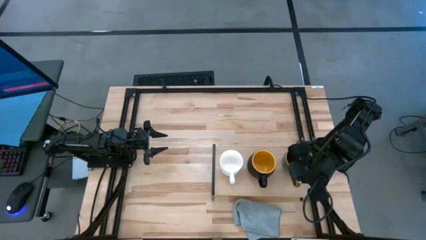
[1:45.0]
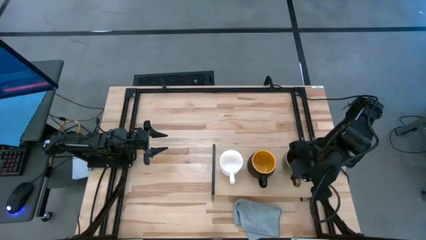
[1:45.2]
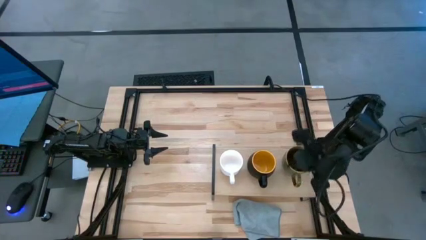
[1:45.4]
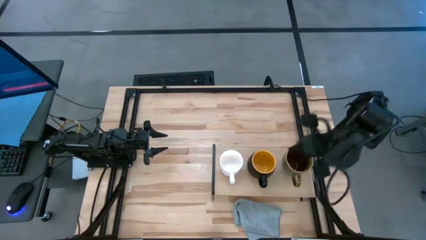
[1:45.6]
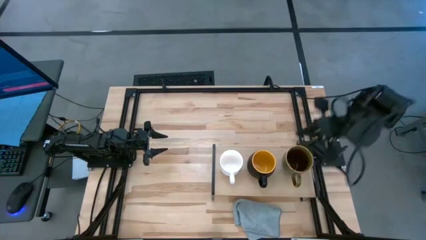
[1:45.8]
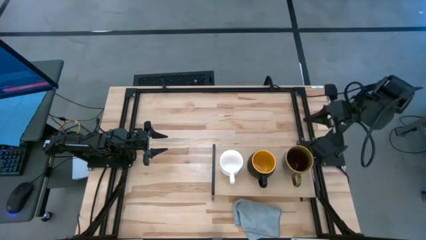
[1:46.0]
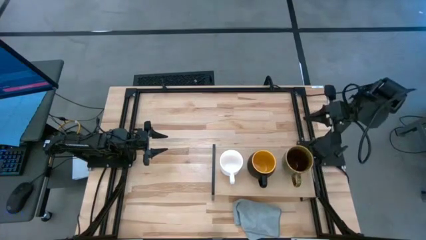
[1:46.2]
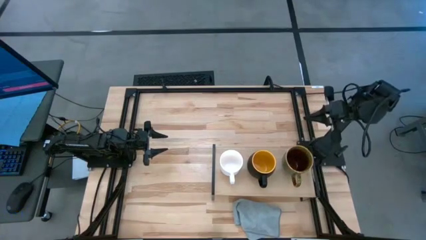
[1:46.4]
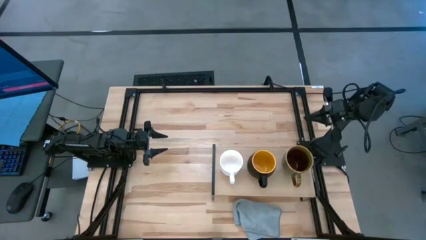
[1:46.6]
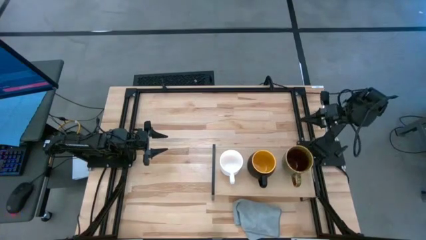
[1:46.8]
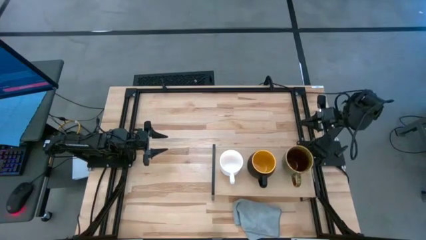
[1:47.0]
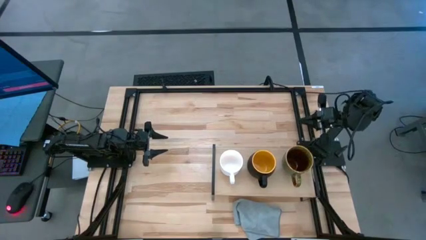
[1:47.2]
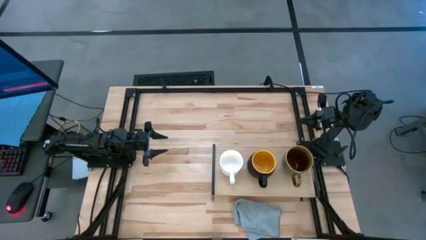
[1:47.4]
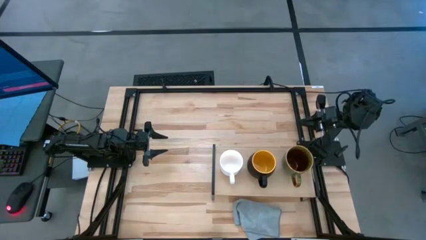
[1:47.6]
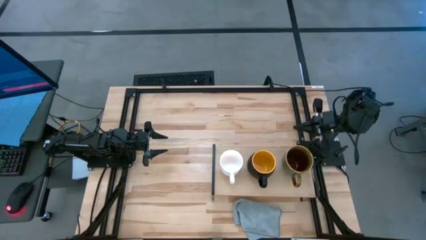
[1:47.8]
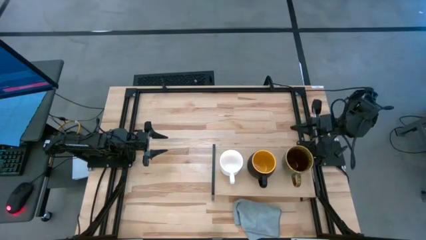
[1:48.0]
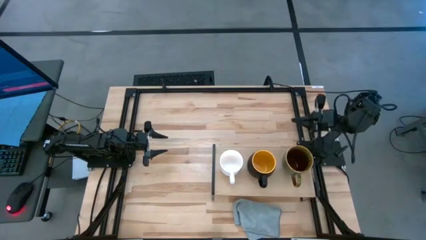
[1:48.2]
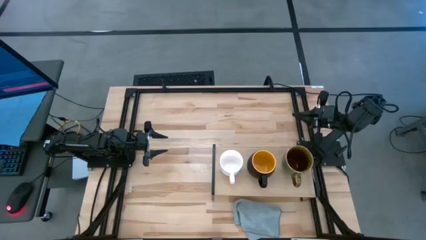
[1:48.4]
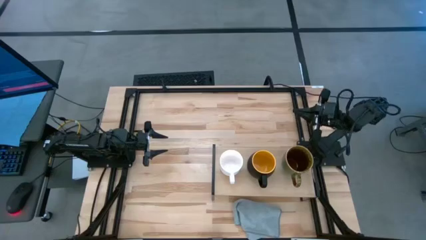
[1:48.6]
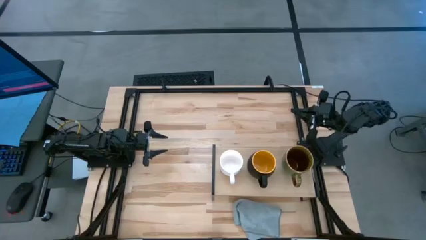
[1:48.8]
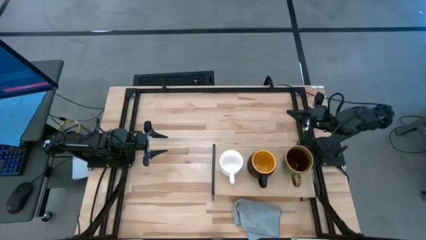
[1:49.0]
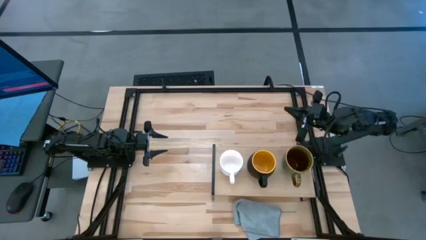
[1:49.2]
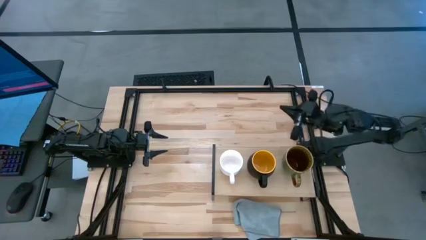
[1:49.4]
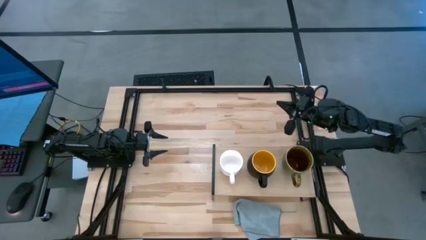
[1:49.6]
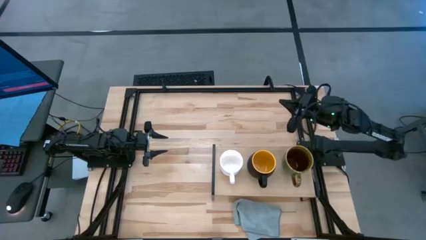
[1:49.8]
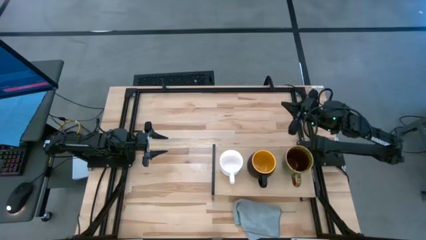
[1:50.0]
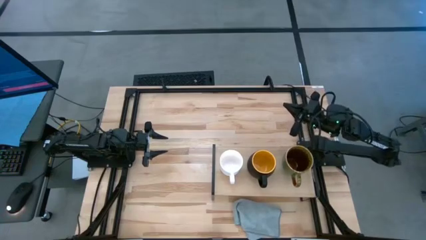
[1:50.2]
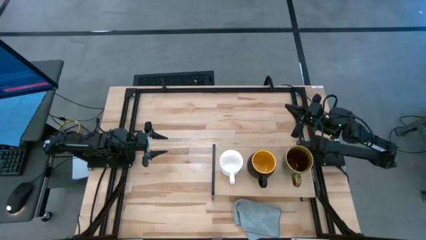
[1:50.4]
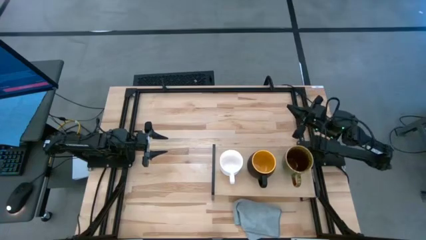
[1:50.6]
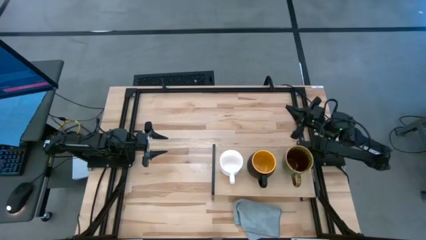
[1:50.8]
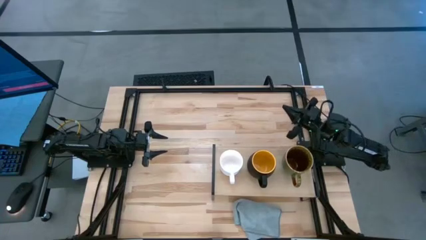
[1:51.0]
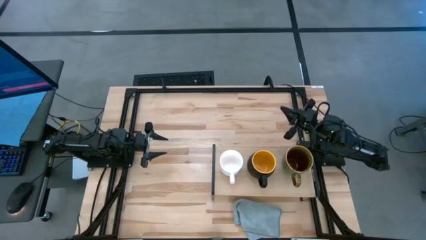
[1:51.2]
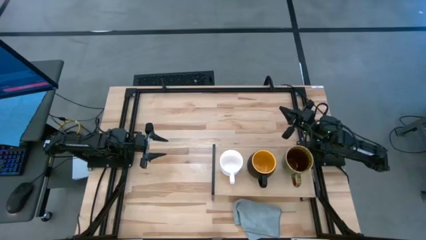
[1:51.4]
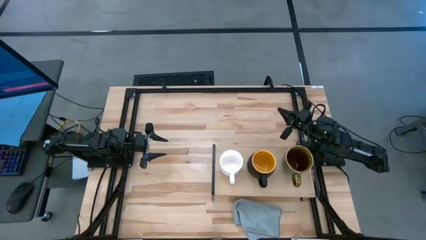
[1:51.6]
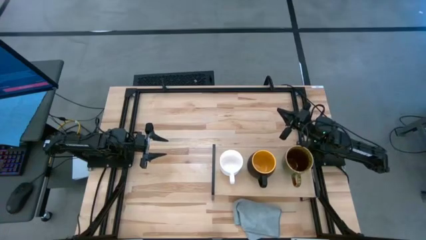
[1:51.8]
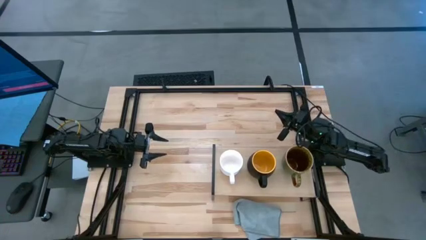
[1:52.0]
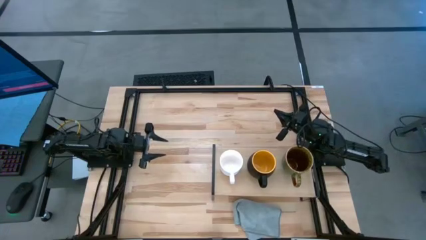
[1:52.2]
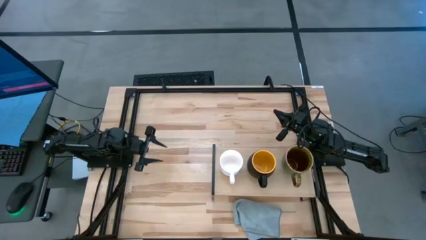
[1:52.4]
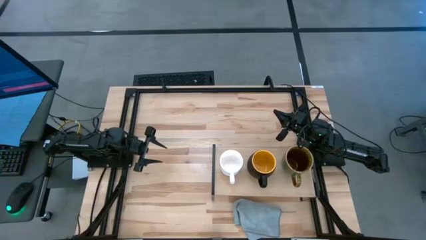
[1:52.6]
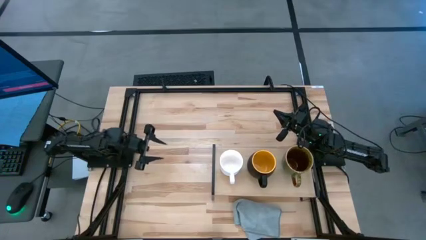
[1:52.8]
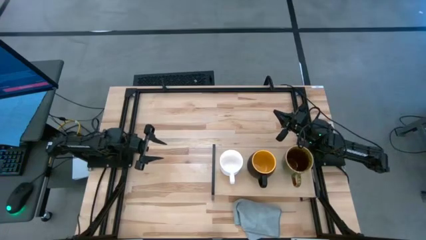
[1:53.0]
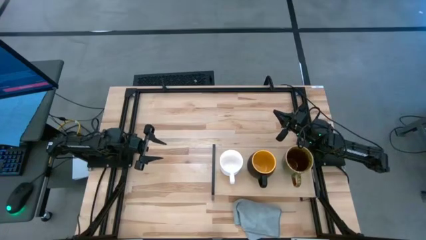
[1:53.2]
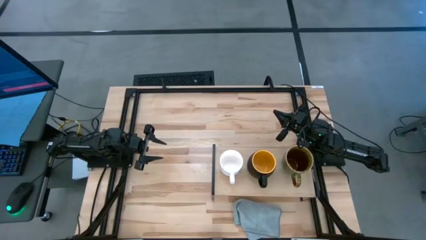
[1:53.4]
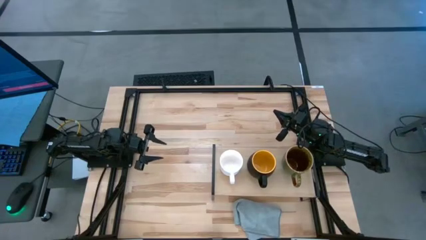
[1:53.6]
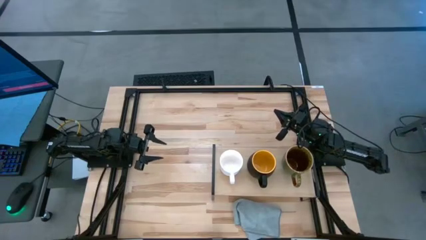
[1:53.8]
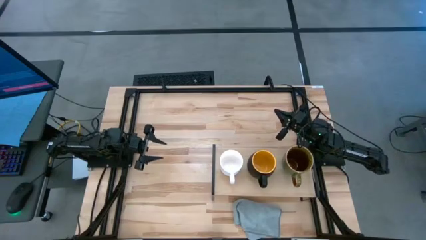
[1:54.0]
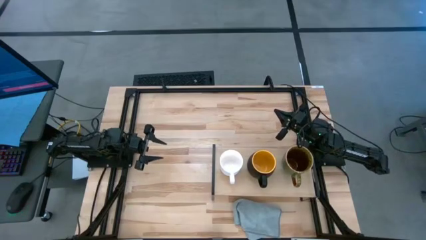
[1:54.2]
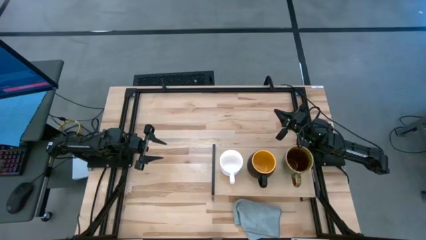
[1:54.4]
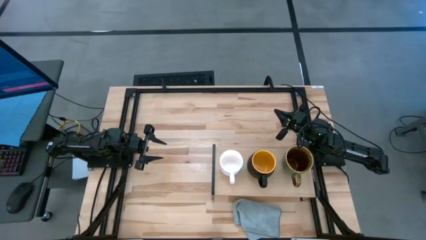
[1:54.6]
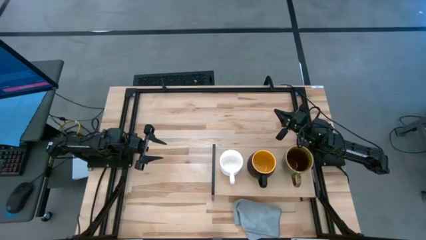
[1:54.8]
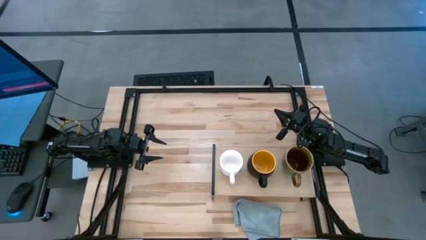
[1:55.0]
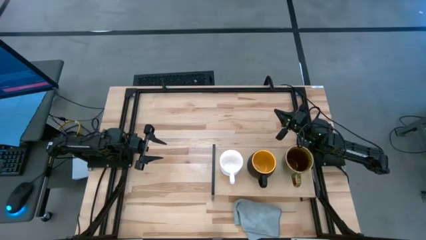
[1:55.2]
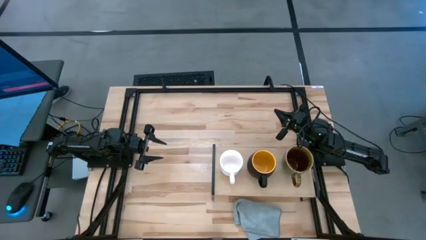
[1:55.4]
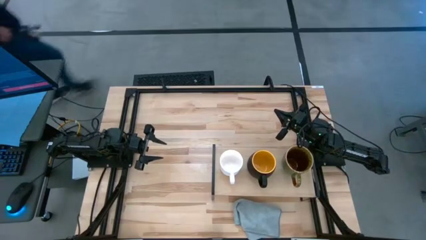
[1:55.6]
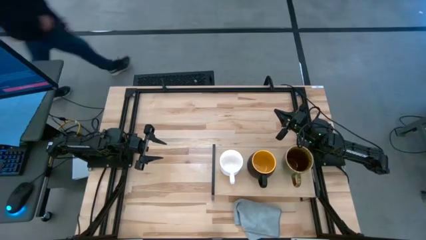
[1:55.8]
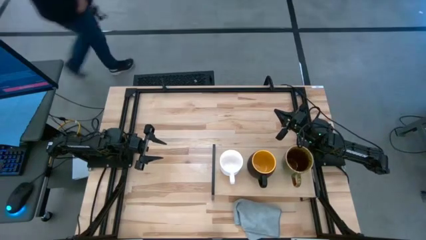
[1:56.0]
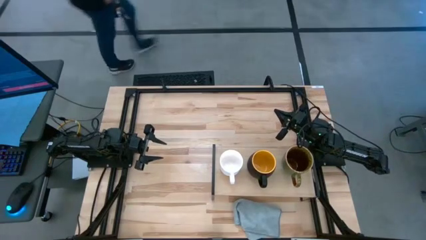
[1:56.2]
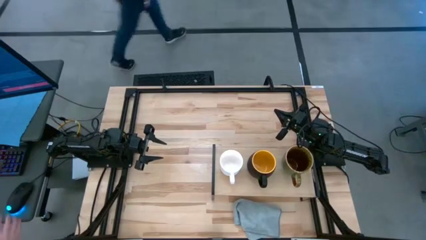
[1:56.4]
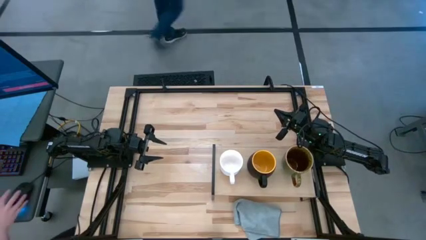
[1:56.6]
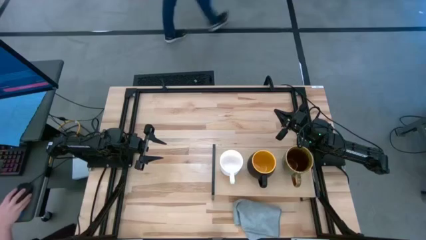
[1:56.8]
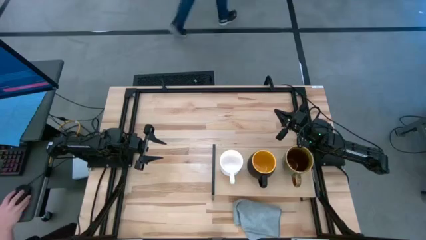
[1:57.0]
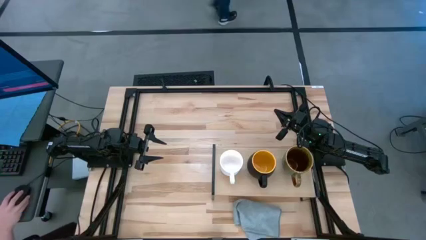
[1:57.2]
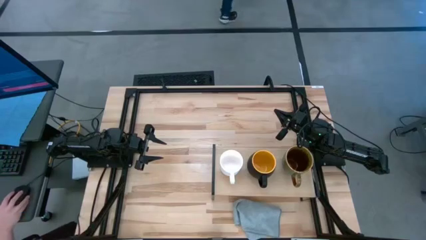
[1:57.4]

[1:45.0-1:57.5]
Task: Stack small to large cups/mugs on shelf
Return to Home Position
